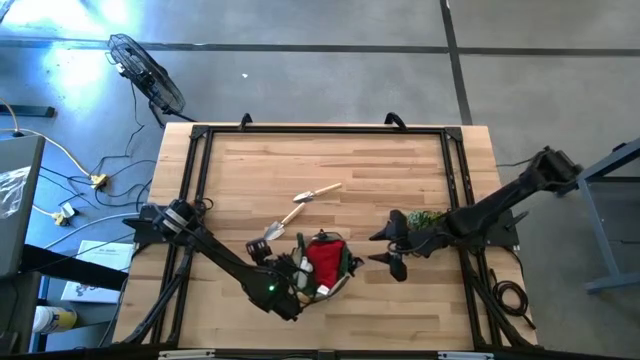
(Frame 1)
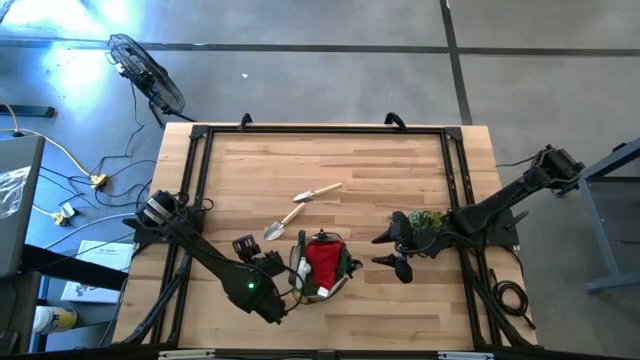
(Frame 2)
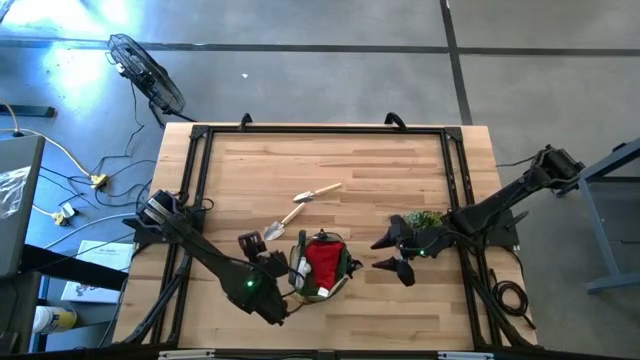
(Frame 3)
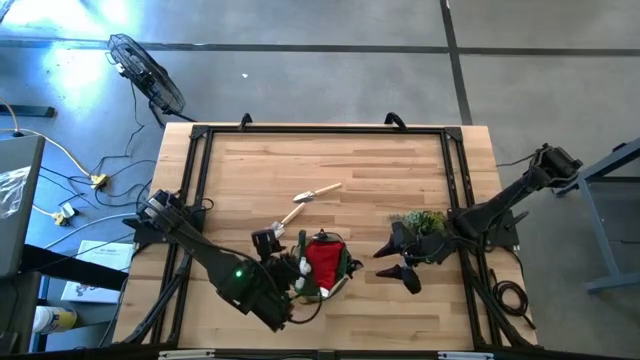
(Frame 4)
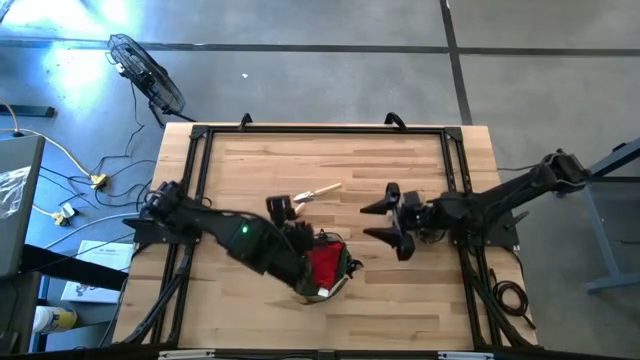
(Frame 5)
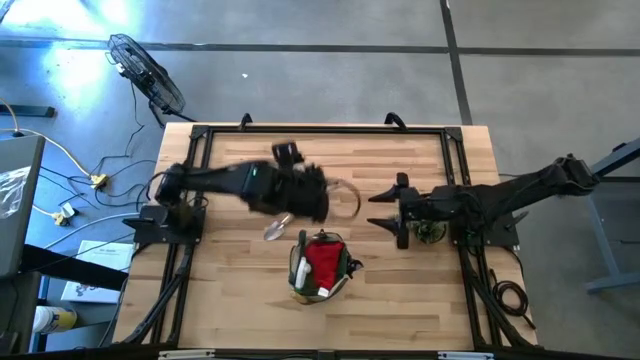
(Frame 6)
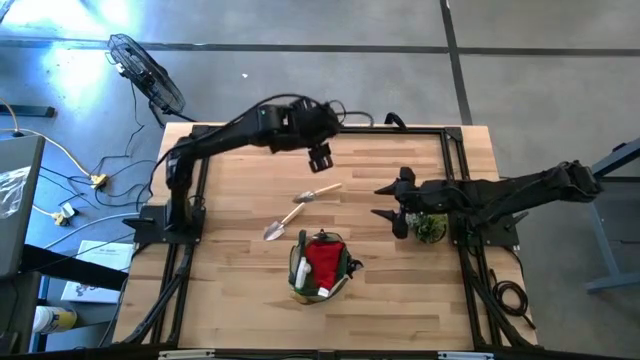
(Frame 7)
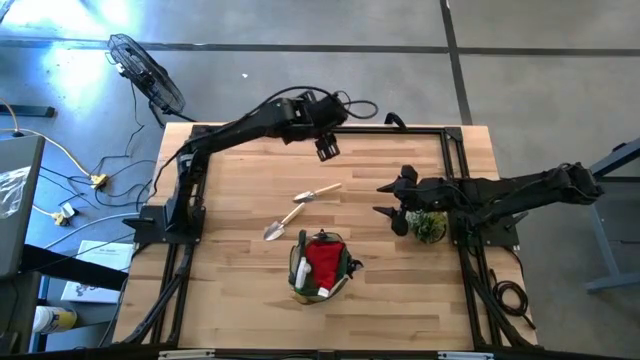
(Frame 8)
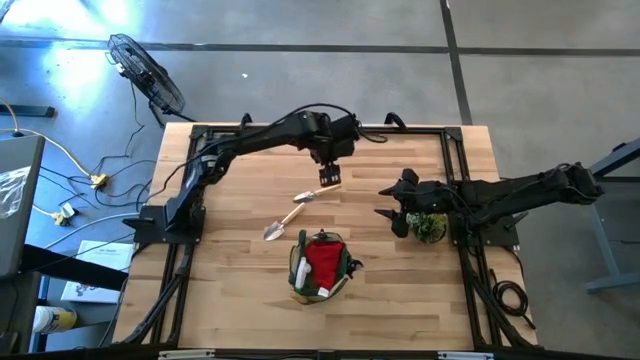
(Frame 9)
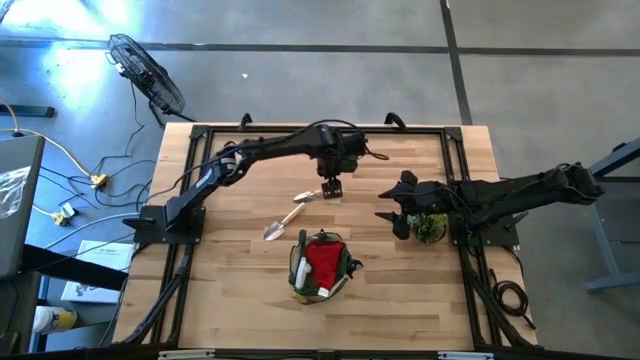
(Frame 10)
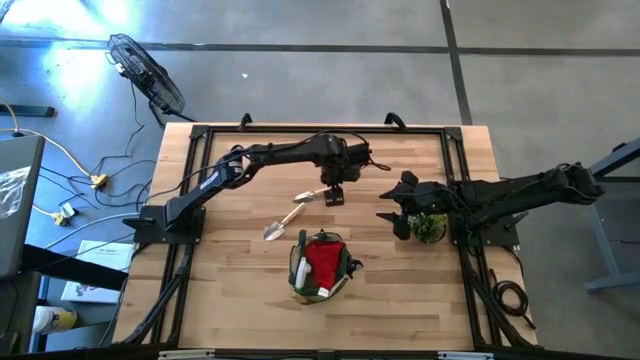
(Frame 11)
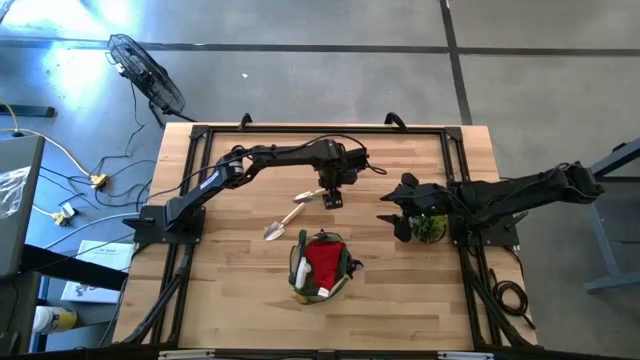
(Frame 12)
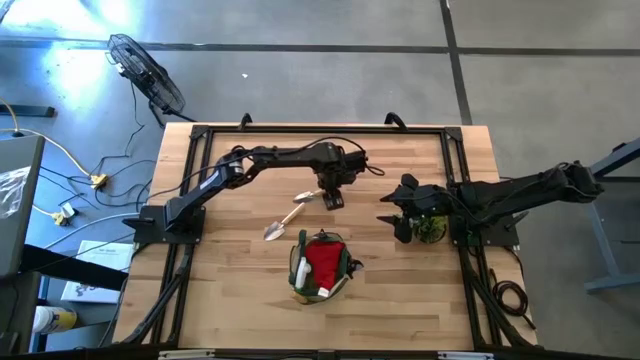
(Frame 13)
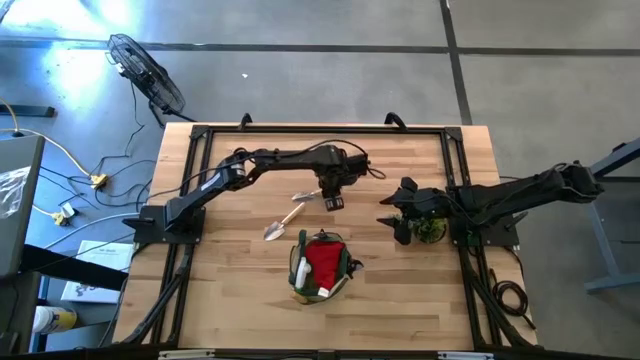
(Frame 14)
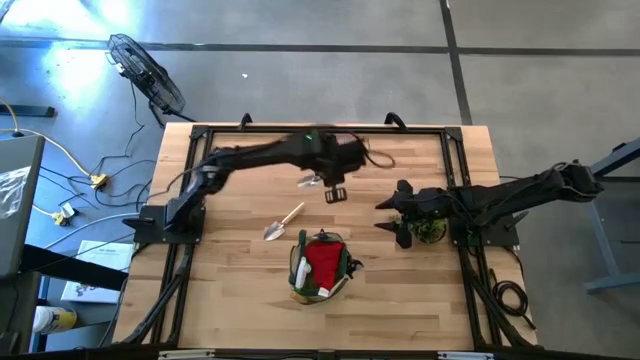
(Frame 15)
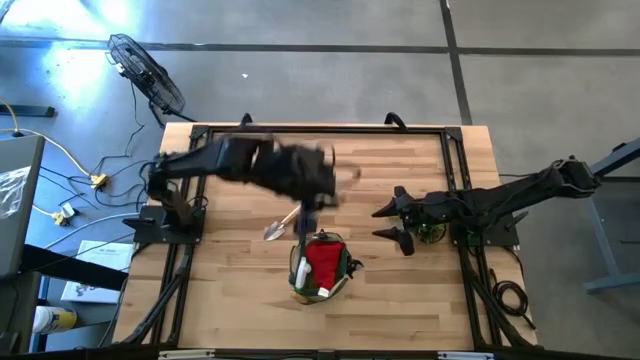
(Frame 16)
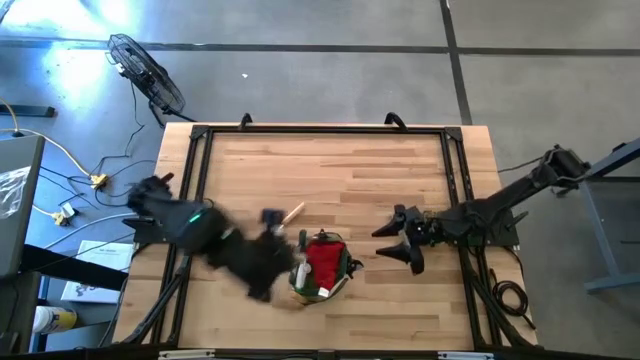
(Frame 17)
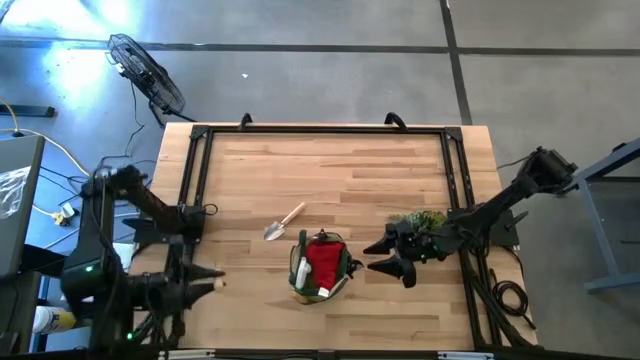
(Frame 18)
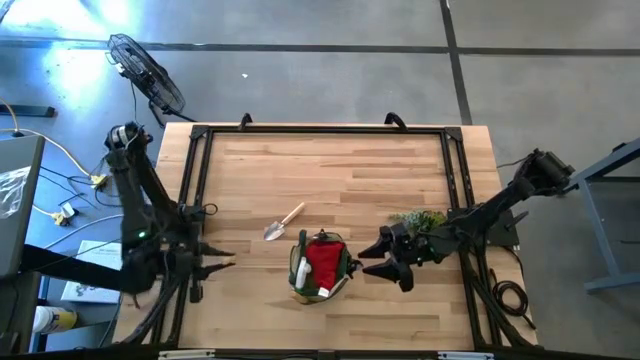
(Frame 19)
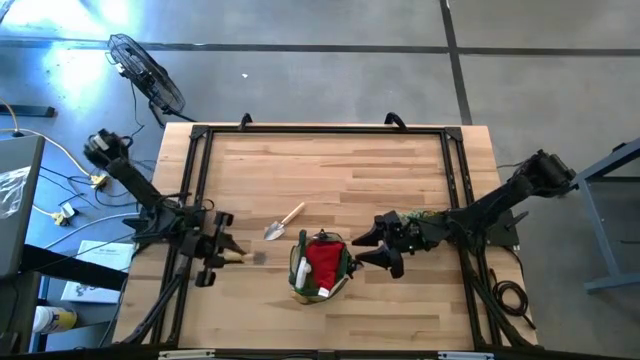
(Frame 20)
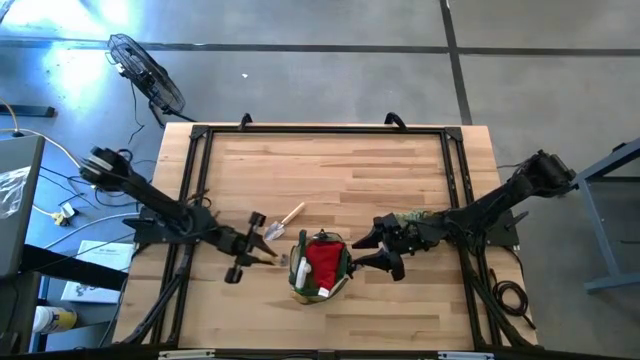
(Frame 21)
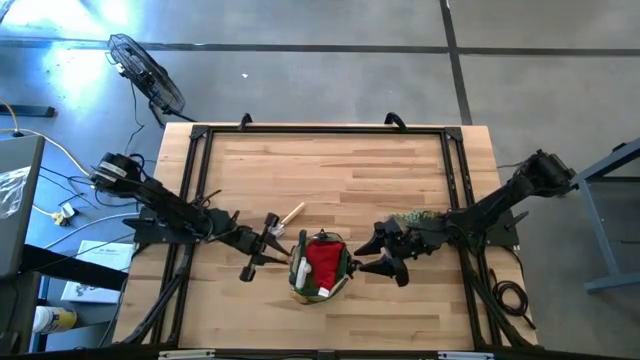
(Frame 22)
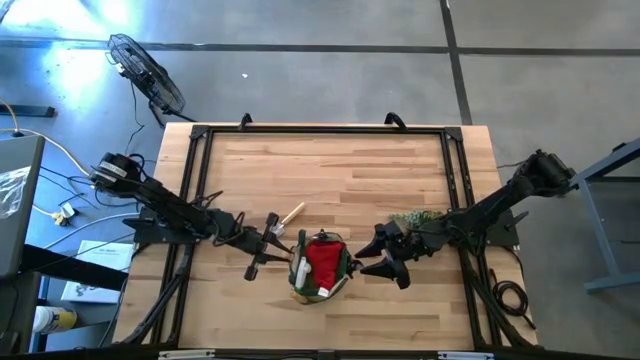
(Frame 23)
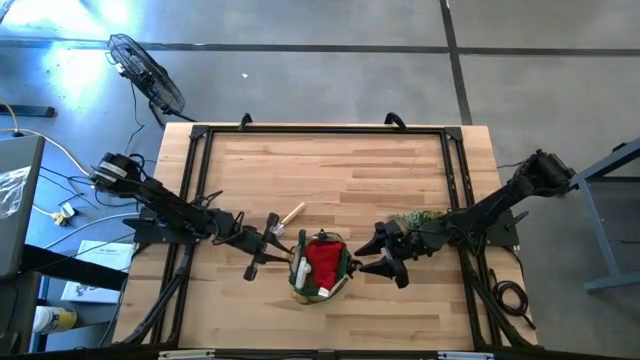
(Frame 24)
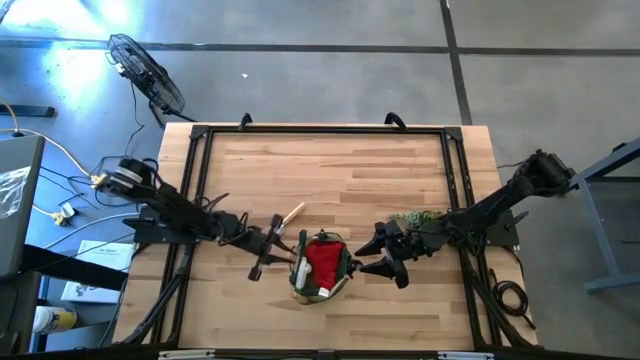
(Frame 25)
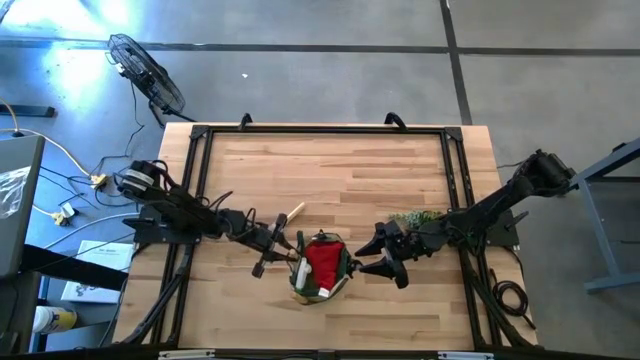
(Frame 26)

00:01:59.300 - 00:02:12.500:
Task: Pick & Place Garden tools in Gardening bag
Put the top brown trowel into the gardening bag

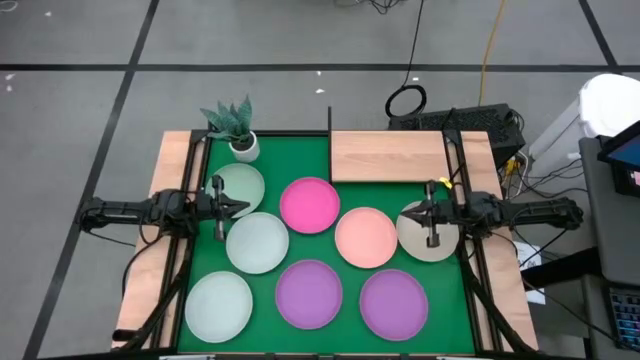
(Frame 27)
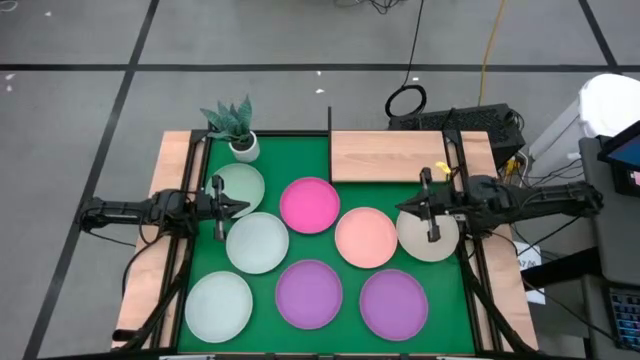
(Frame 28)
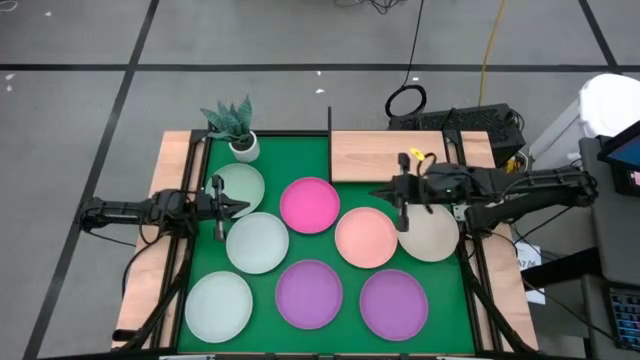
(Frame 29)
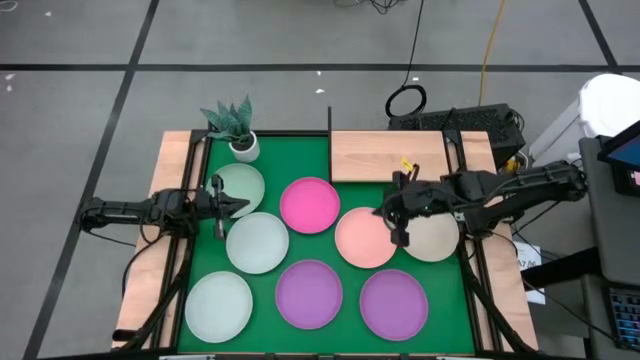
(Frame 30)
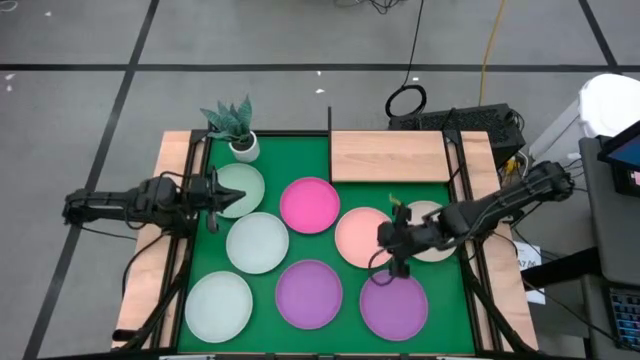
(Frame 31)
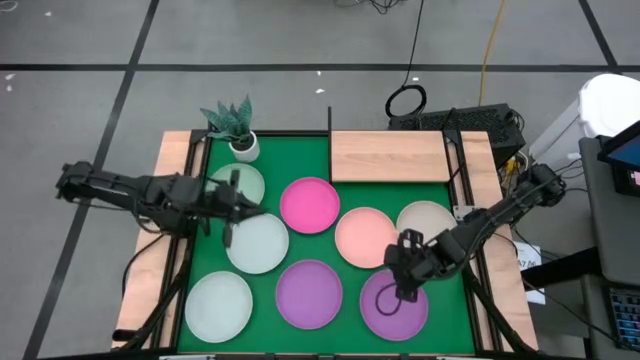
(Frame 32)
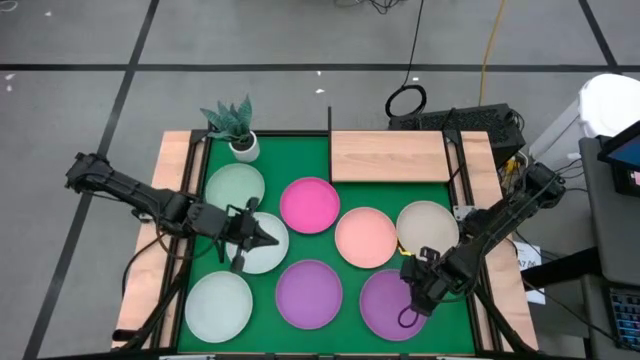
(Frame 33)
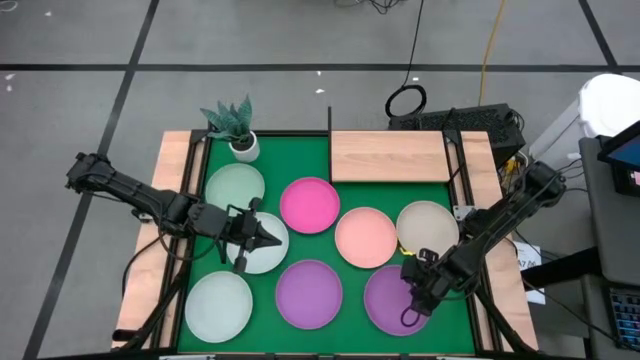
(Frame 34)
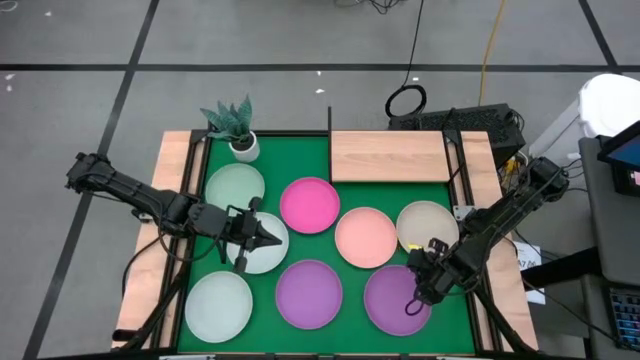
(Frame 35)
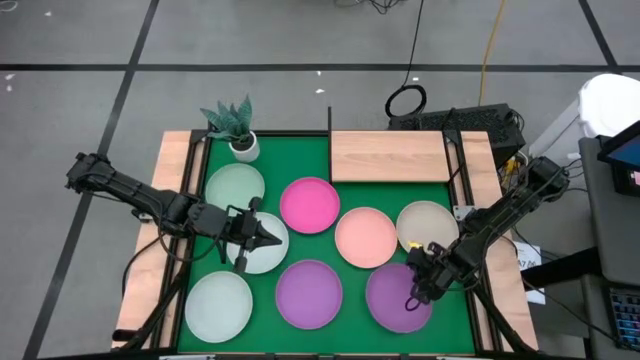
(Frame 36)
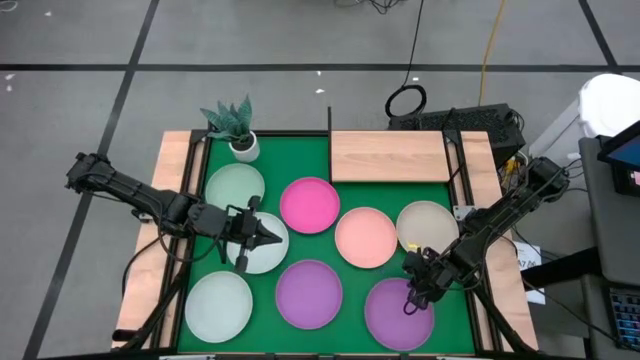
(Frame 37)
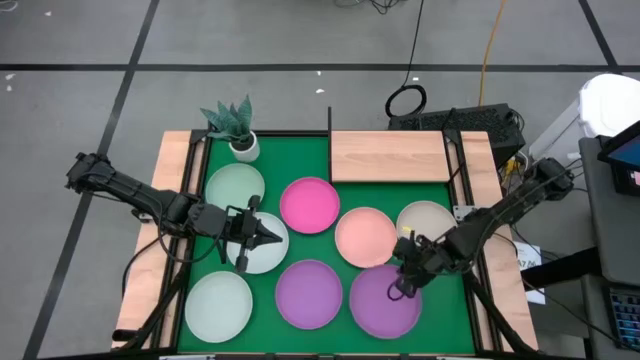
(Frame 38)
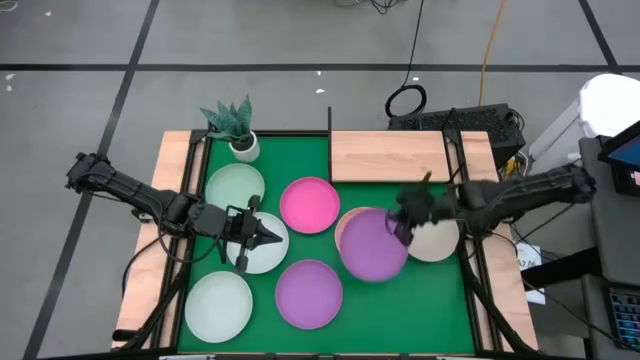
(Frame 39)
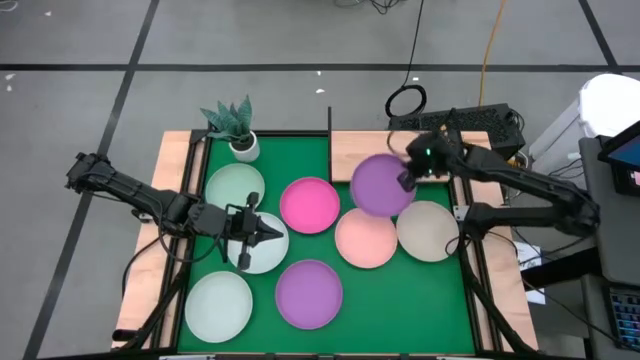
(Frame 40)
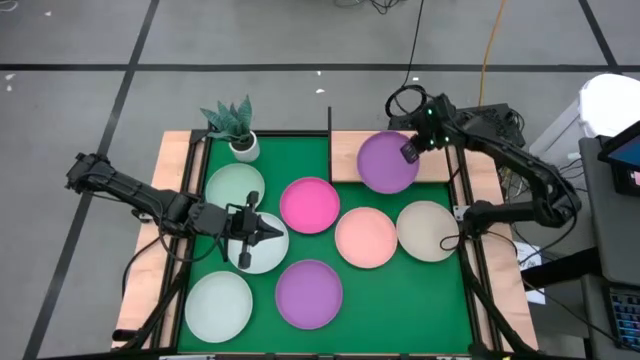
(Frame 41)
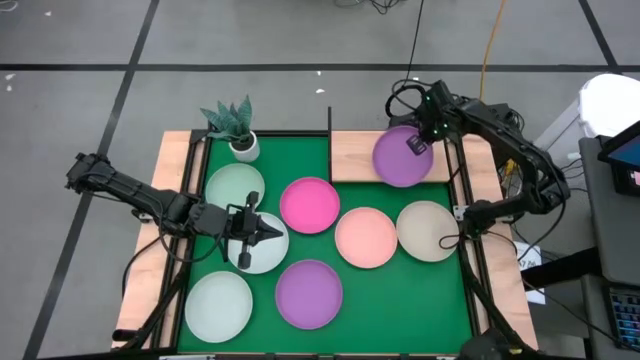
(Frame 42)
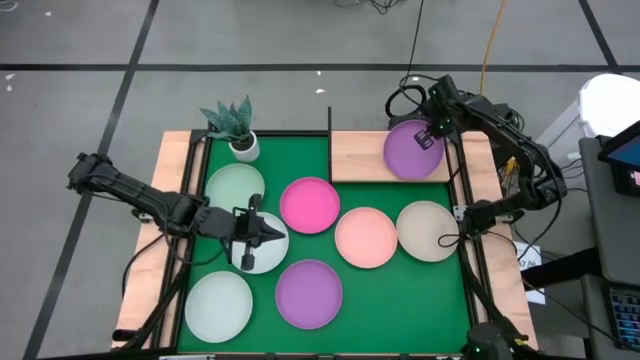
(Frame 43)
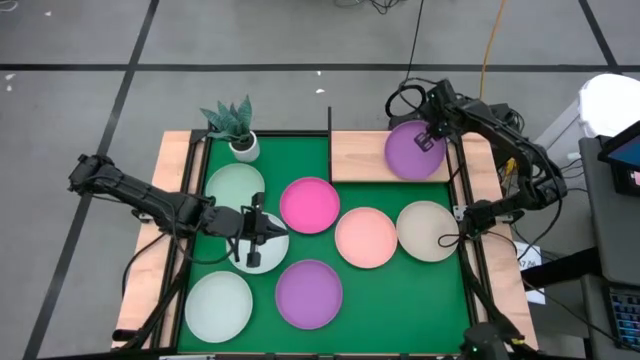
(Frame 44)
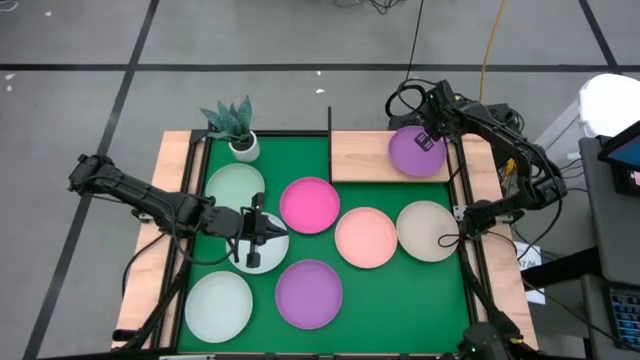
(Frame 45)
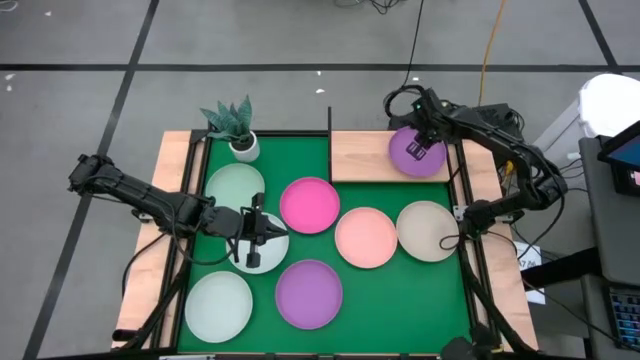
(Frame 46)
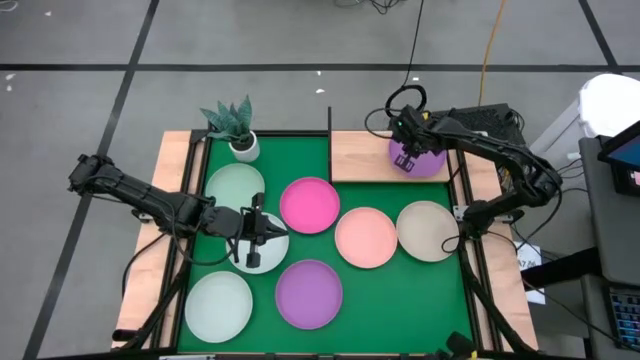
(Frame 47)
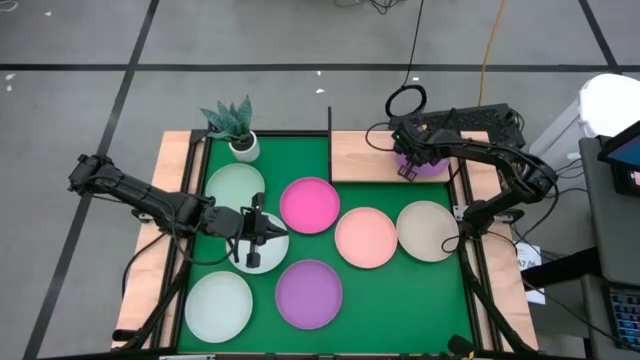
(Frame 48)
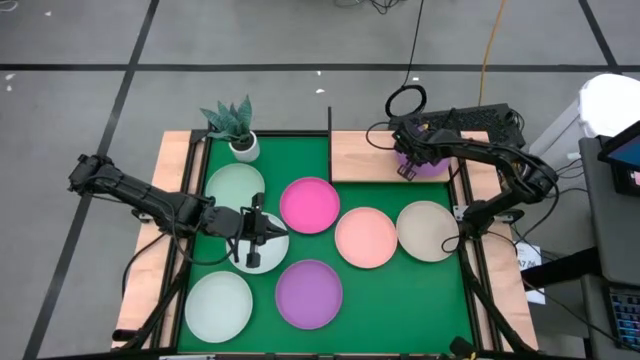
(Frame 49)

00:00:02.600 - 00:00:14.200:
Task: Place and stack plates onto a shelf
Put the right purple plate on the shelf
